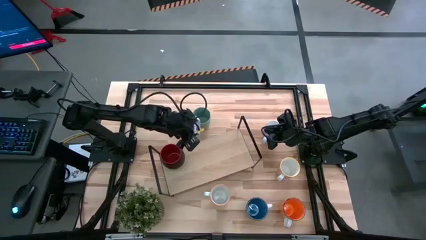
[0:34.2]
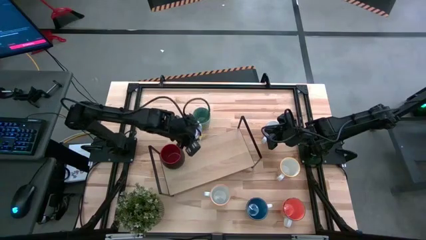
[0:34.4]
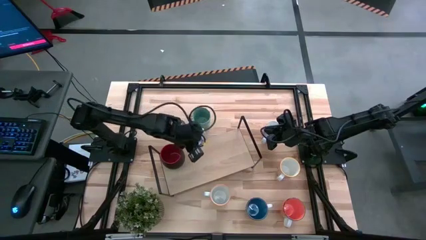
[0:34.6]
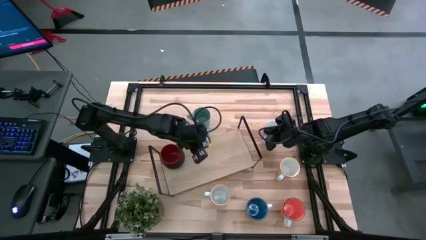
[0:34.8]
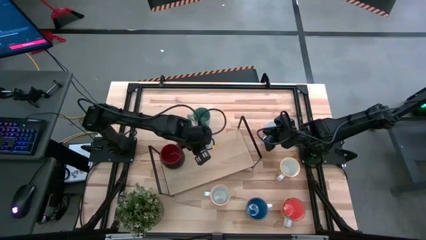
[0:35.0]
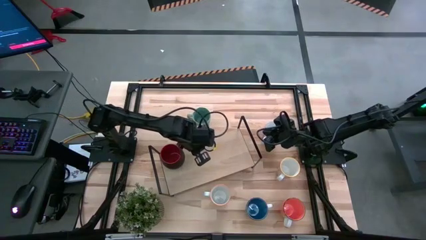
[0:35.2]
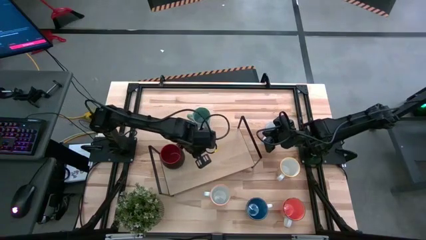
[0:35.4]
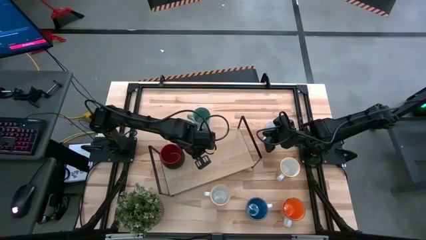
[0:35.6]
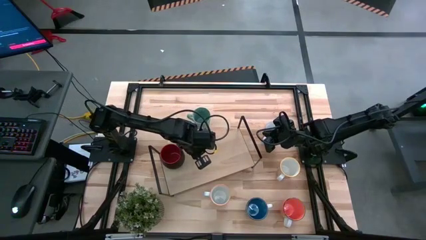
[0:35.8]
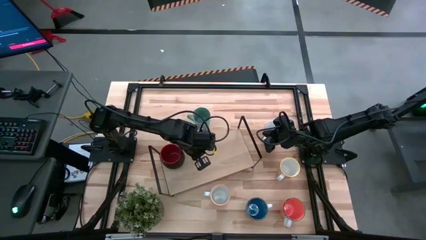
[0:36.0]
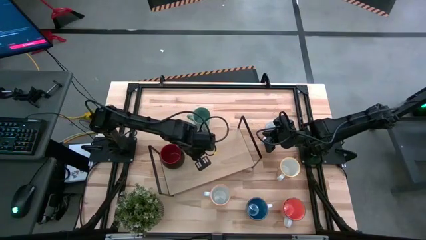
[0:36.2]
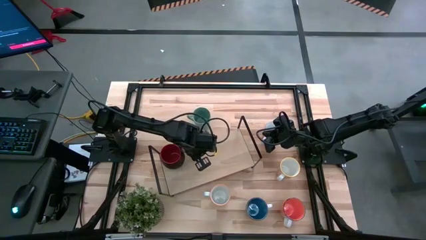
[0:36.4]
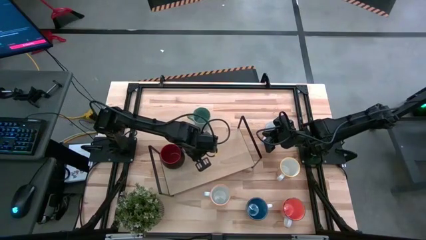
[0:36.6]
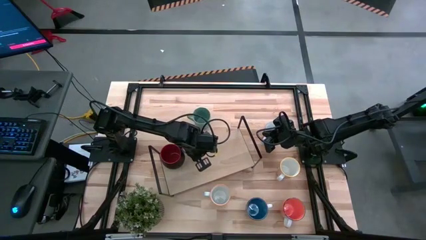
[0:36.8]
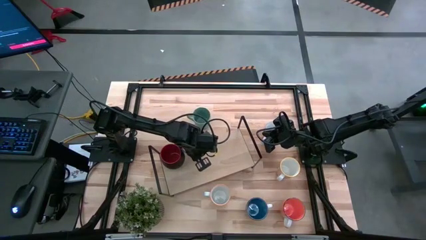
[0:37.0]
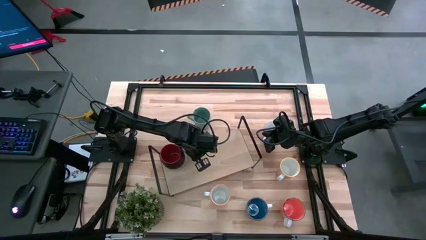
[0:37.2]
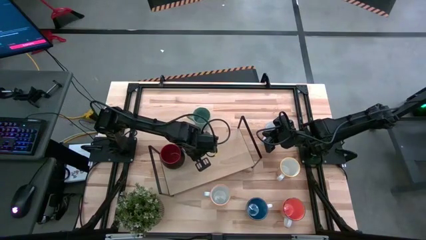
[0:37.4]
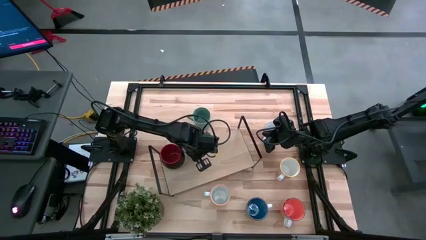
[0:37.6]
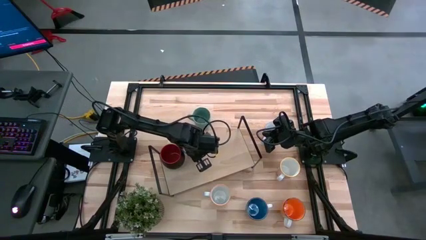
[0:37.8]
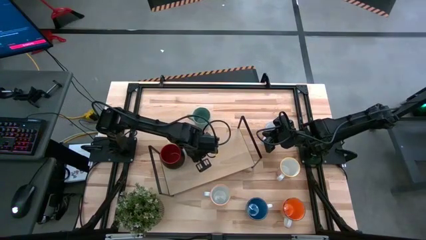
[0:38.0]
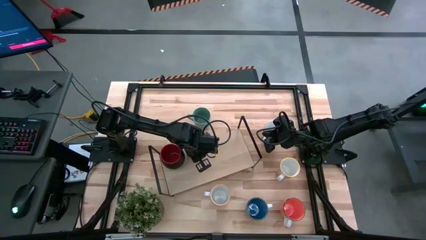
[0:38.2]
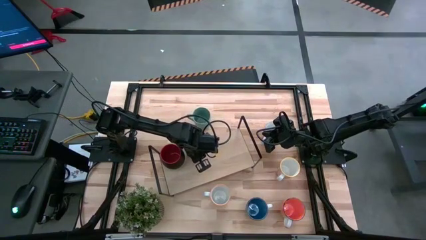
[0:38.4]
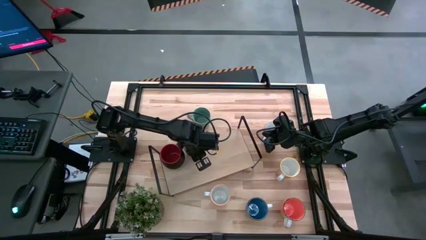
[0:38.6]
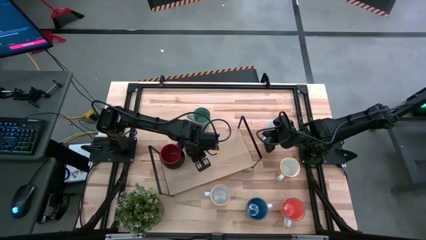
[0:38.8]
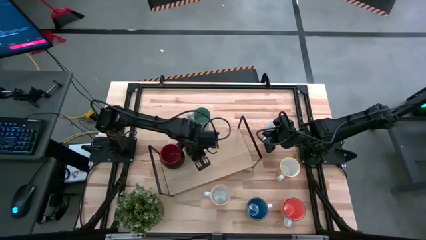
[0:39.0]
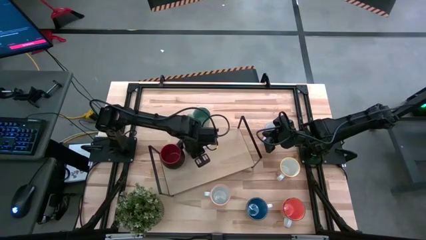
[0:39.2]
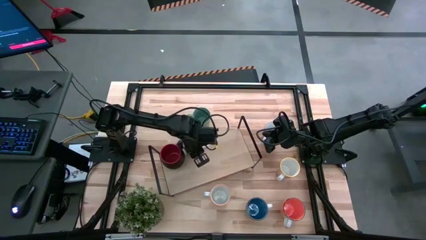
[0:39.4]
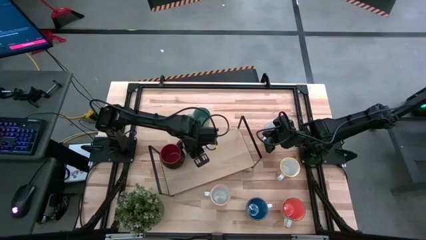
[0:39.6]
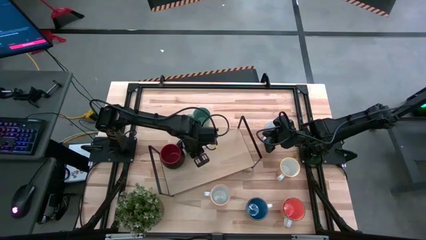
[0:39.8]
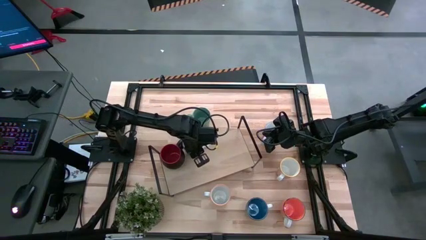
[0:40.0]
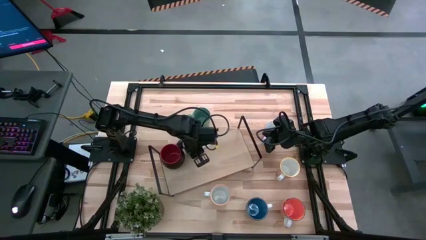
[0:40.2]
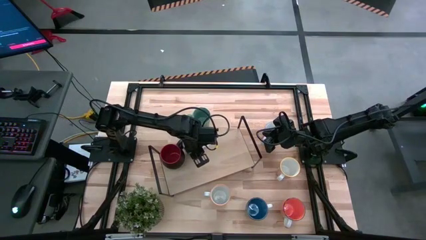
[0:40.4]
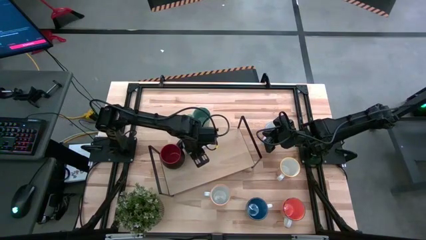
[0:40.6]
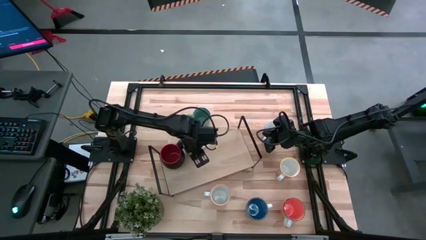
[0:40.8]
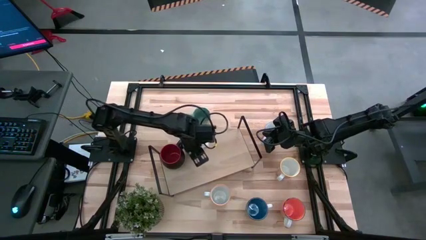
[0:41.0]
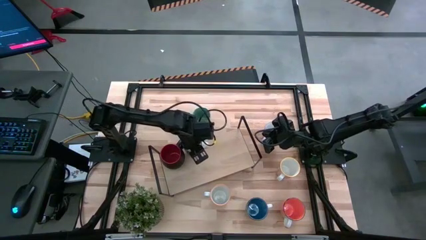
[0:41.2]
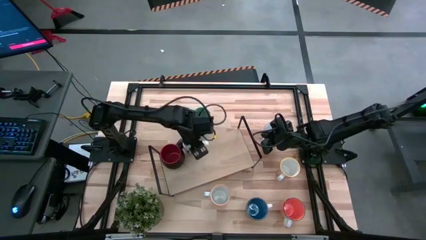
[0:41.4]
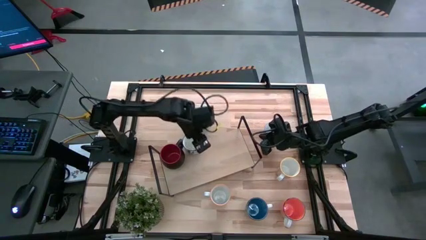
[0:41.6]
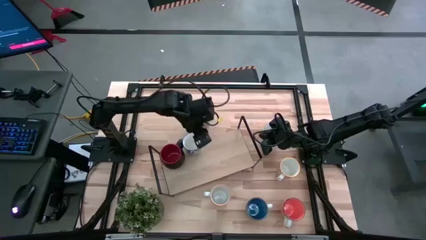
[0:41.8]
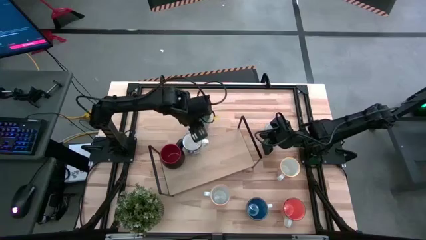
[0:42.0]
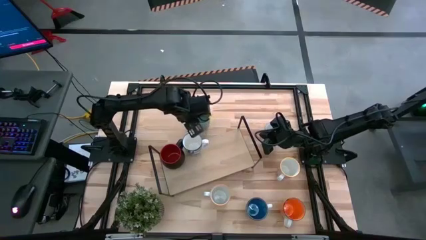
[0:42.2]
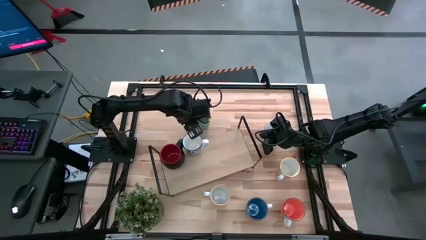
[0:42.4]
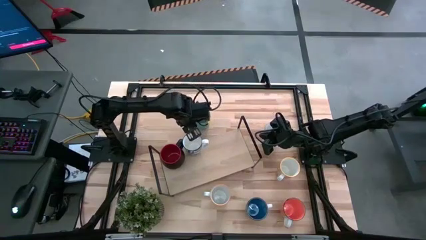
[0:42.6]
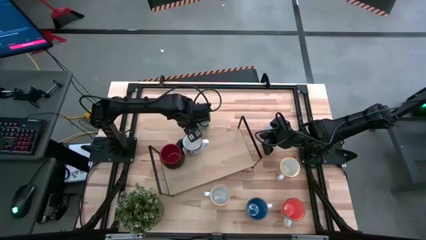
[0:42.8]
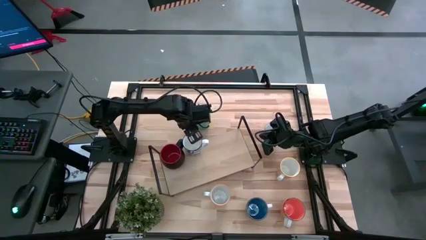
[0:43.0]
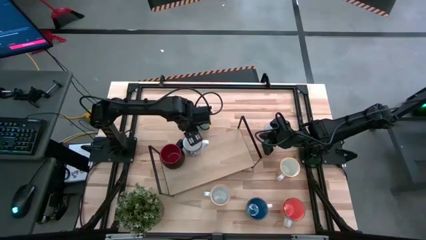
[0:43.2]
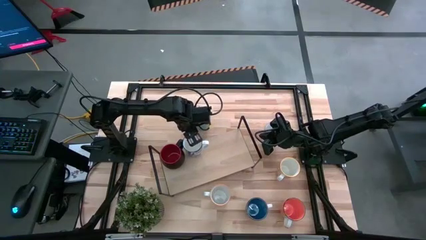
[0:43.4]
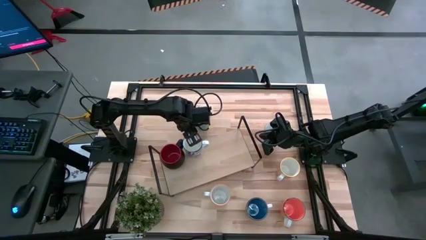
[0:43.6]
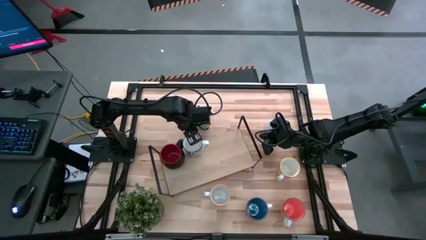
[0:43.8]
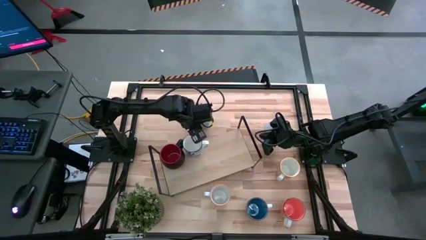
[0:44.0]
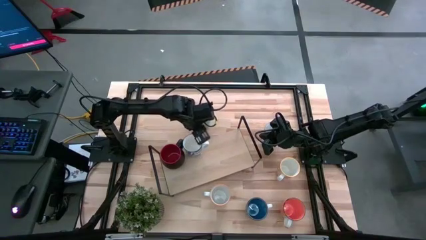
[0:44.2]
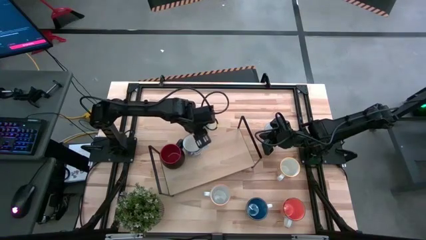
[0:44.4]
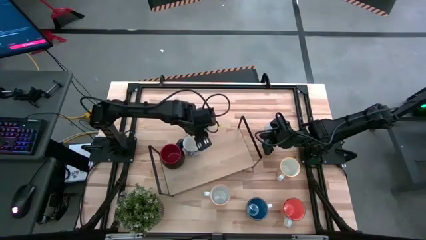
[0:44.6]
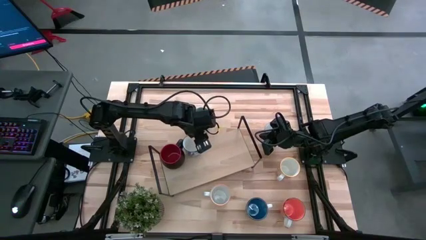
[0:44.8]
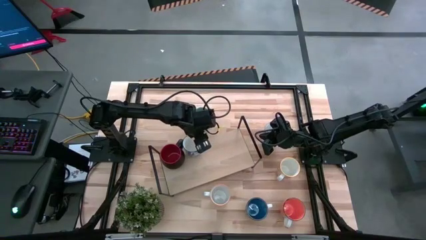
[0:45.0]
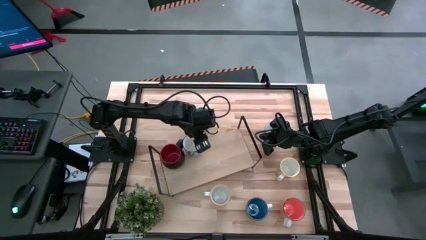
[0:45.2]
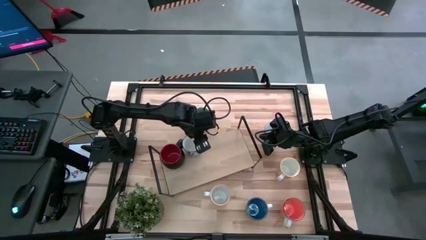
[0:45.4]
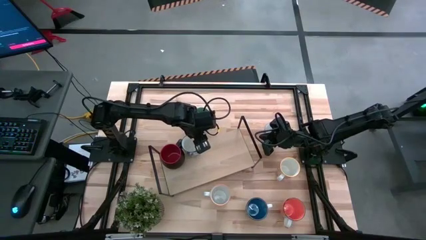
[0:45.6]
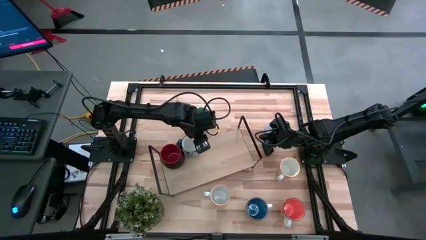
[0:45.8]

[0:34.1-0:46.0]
Task: Place coffee mugs
Put the blue pattern mug on the shelf
